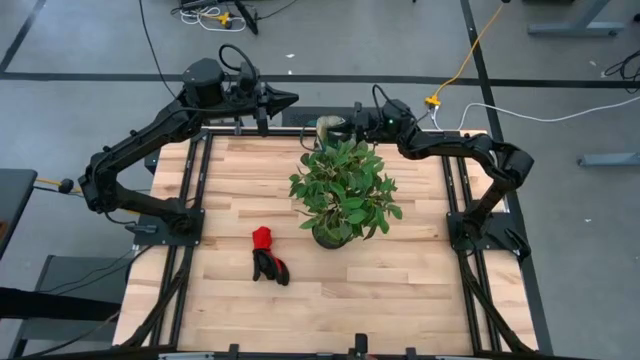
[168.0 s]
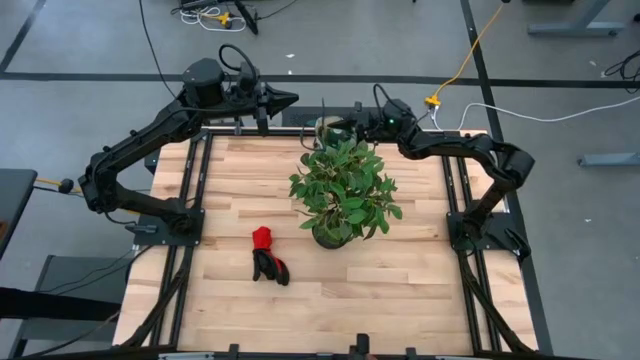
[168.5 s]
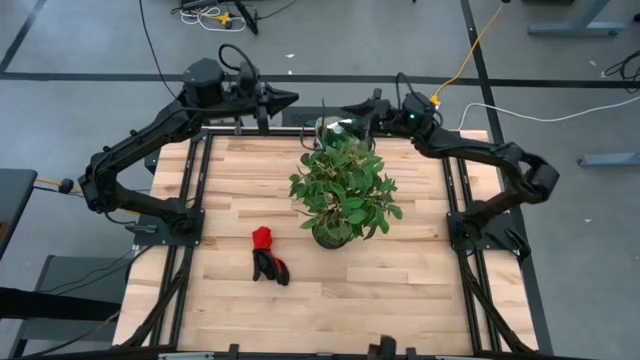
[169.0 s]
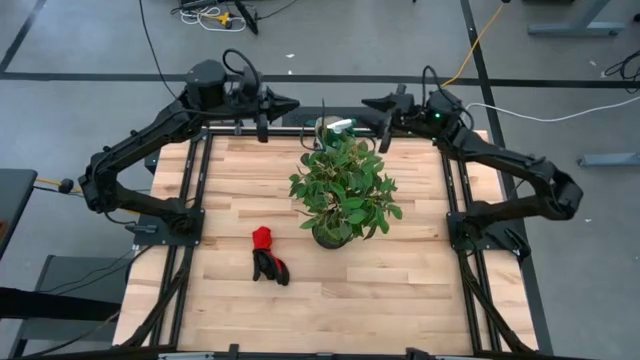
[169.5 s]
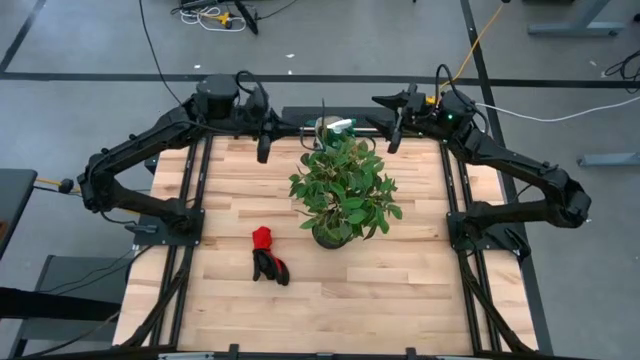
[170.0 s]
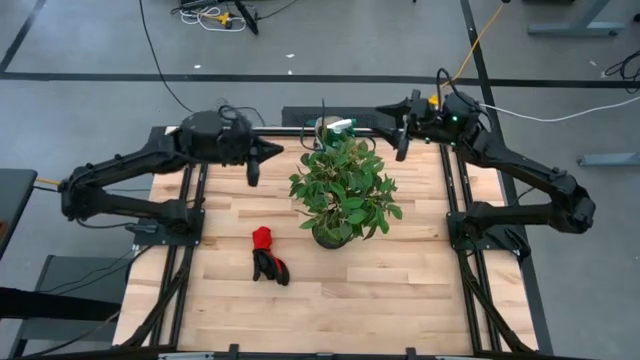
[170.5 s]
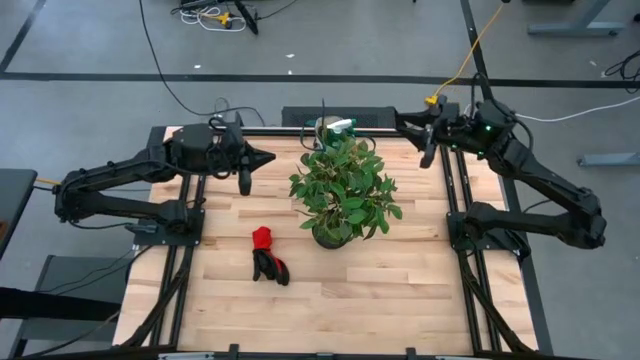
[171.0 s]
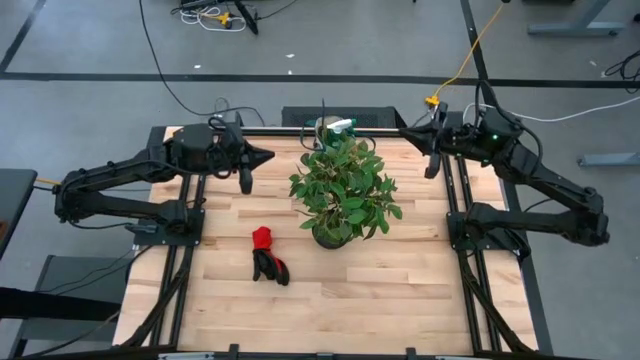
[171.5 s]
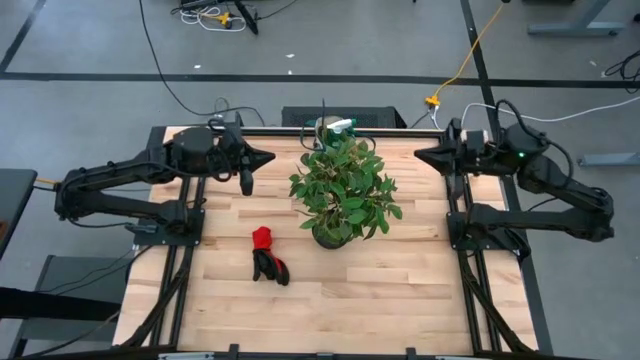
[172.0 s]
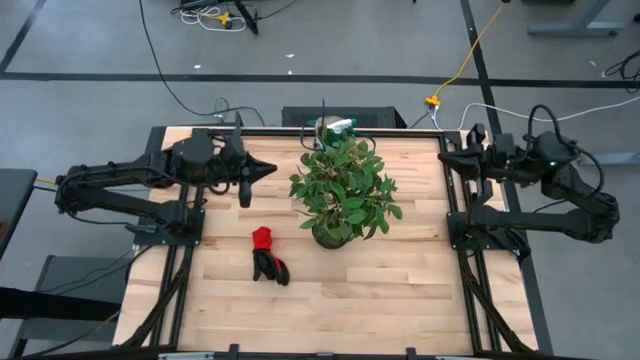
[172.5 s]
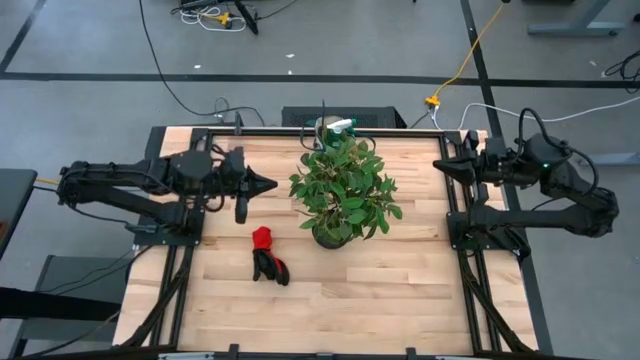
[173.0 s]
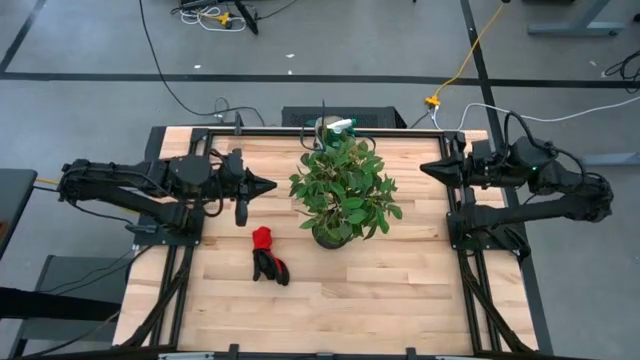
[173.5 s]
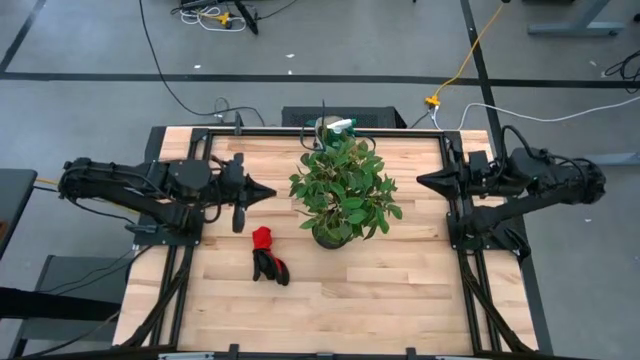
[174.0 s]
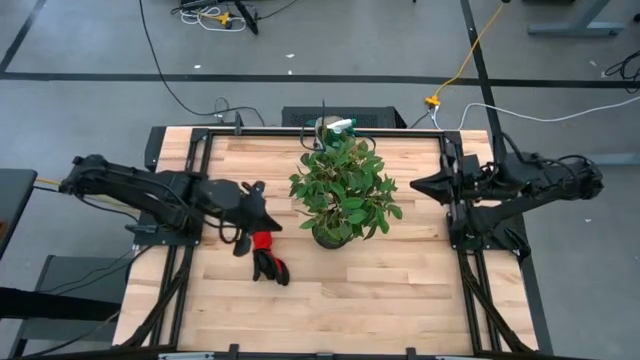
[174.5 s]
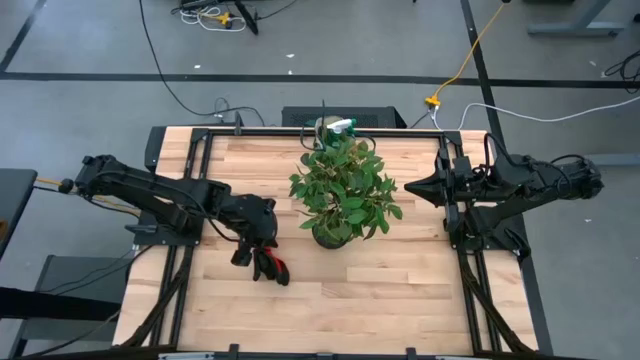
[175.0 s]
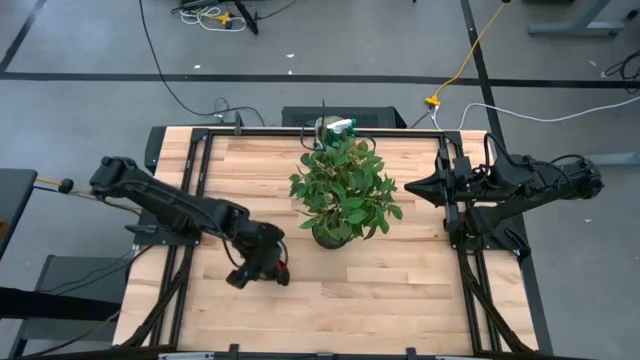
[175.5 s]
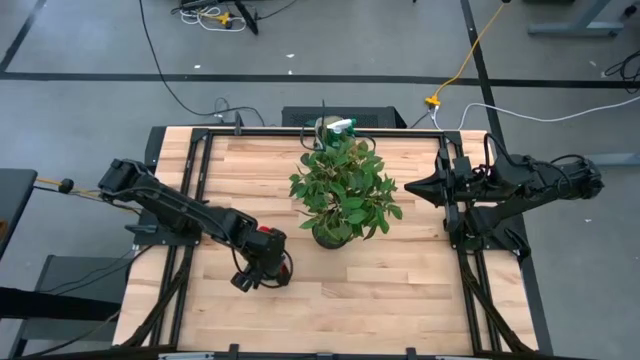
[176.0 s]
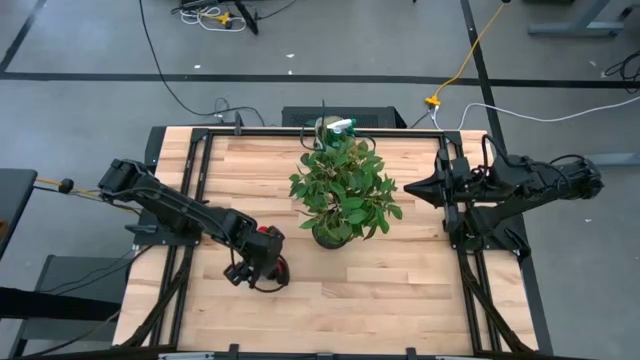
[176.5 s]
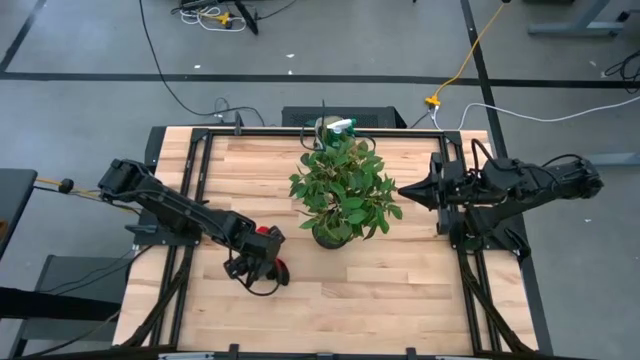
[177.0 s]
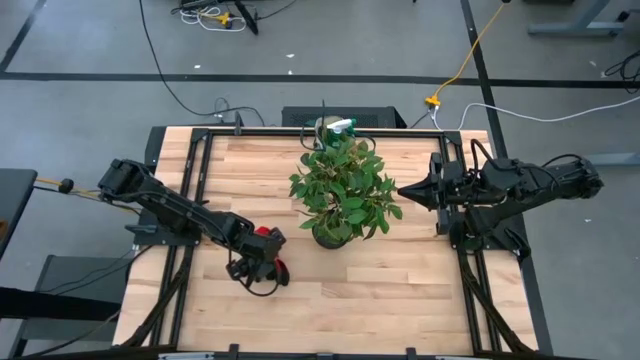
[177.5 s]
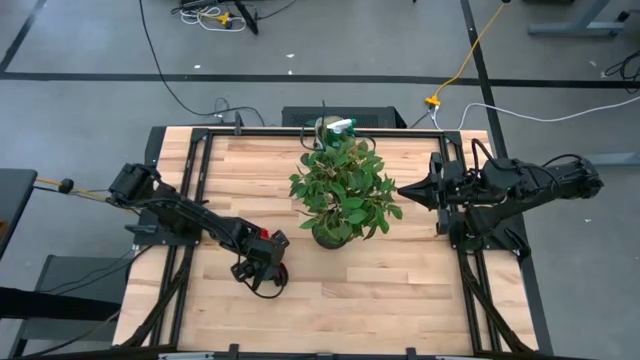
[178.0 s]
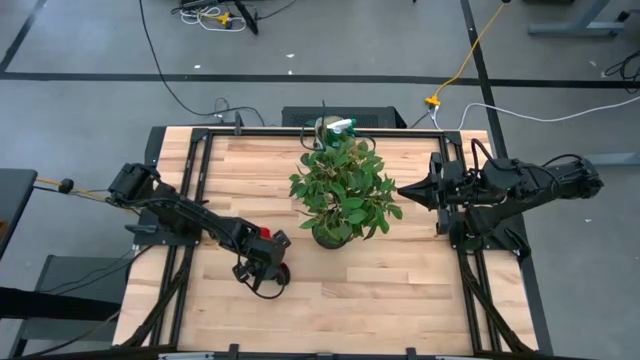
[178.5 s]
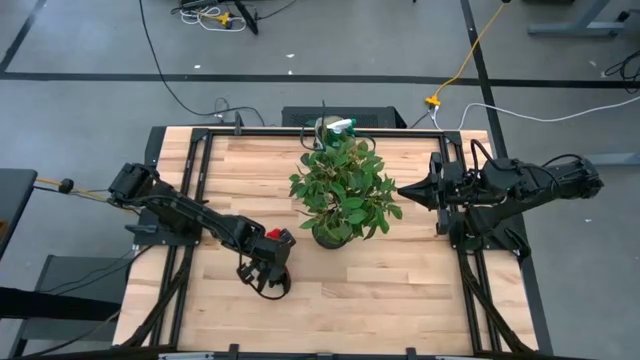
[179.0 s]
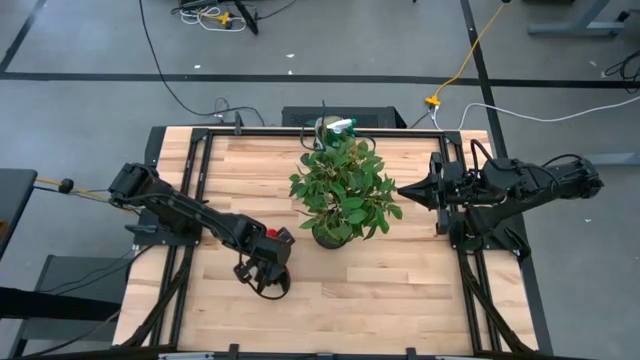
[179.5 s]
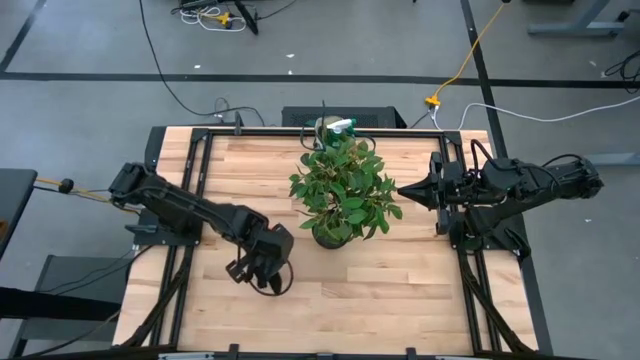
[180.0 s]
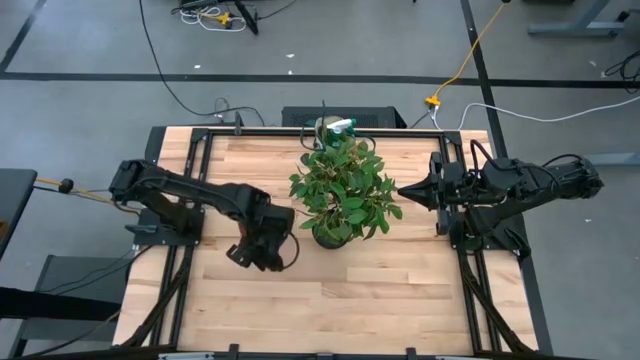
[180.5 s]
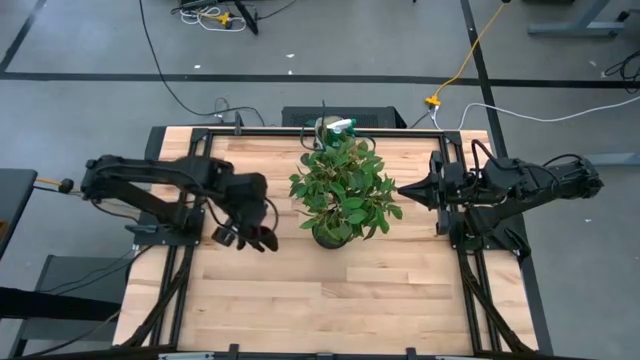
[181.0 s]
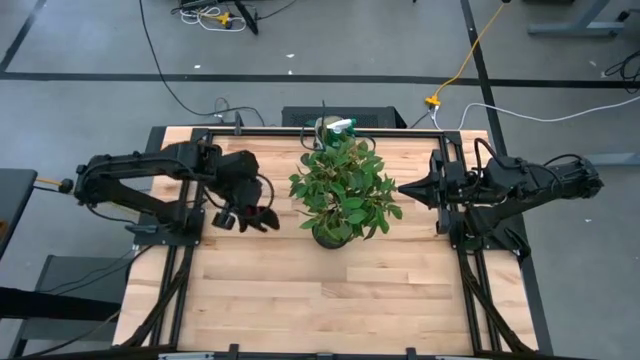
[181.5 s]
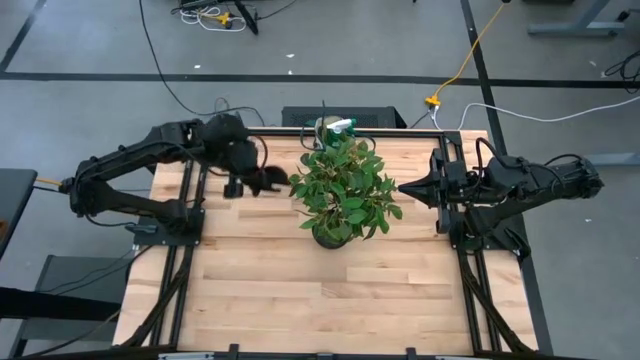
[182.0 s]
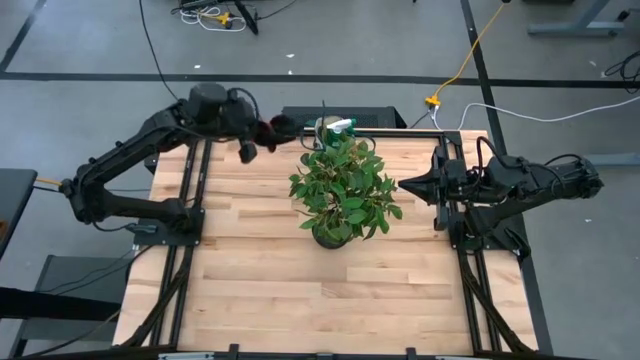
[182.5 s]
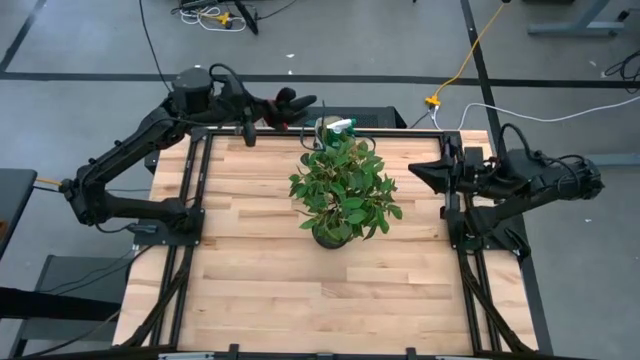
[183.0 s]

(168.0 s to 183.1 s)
Task: Pick & Place Garden tools in Gardening bag
Put the black red gloves into the gardening bag

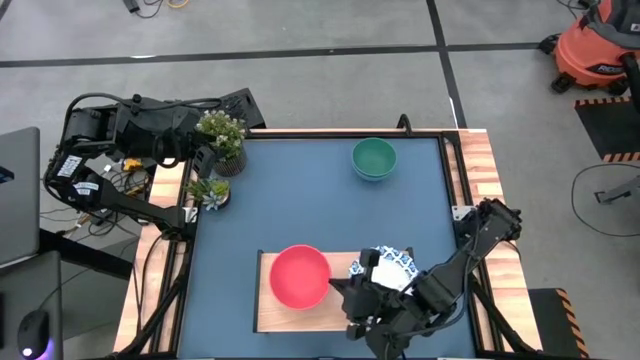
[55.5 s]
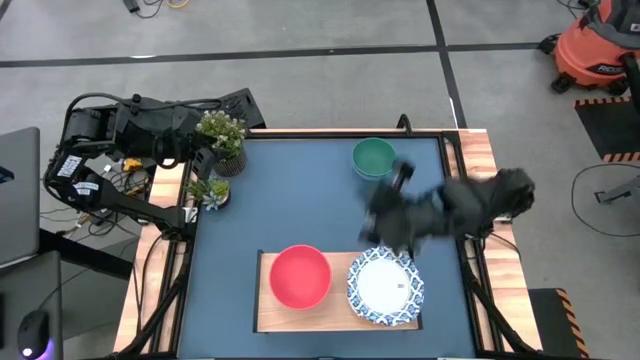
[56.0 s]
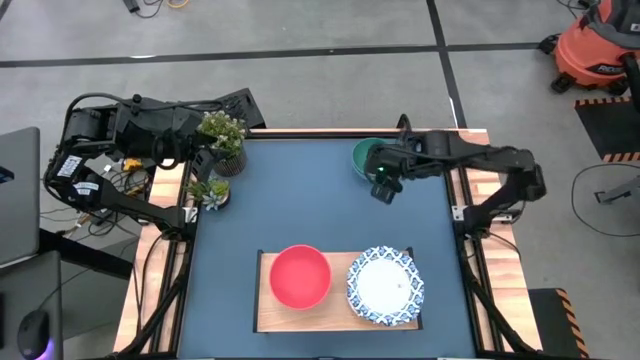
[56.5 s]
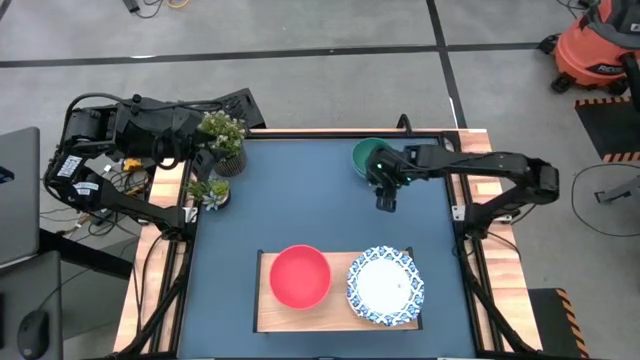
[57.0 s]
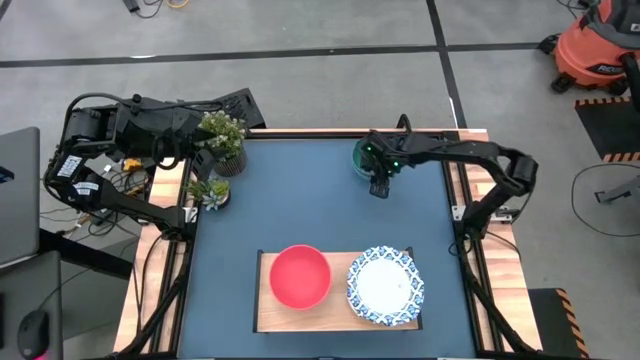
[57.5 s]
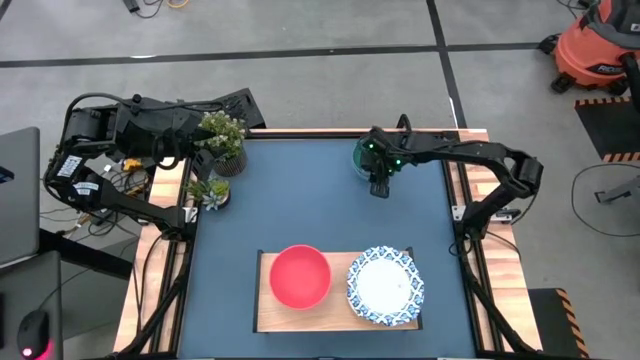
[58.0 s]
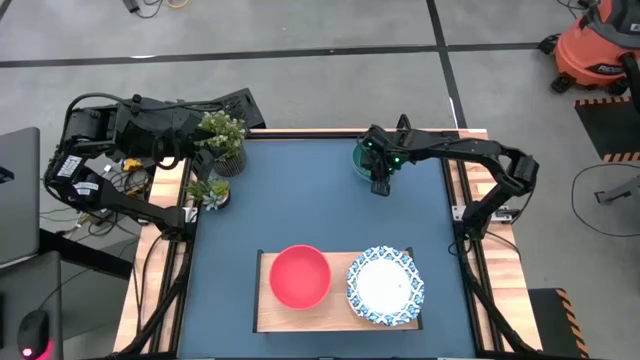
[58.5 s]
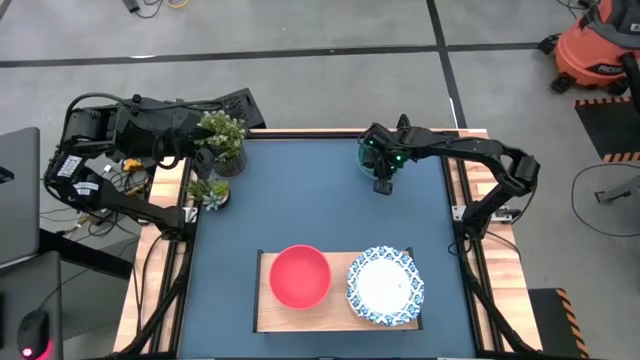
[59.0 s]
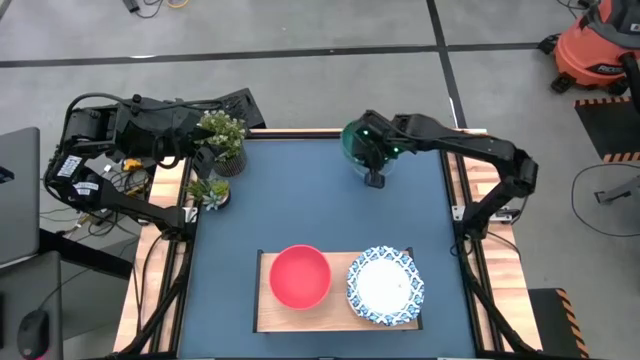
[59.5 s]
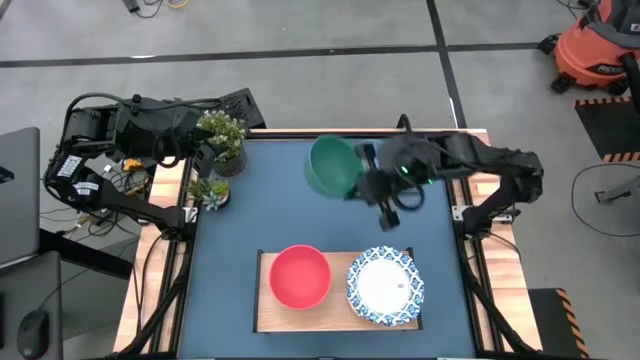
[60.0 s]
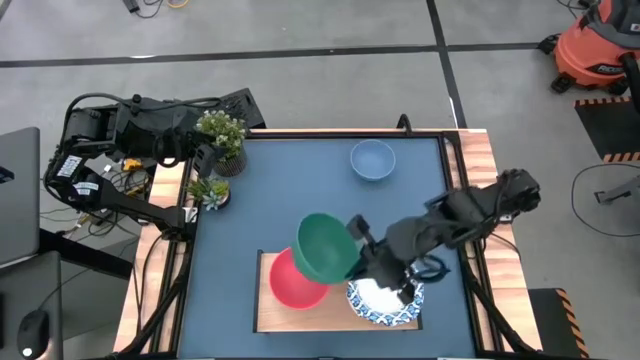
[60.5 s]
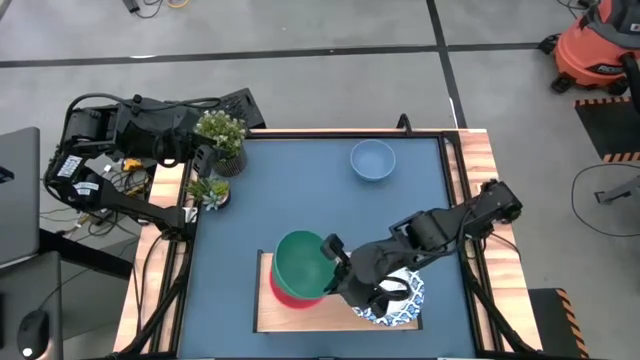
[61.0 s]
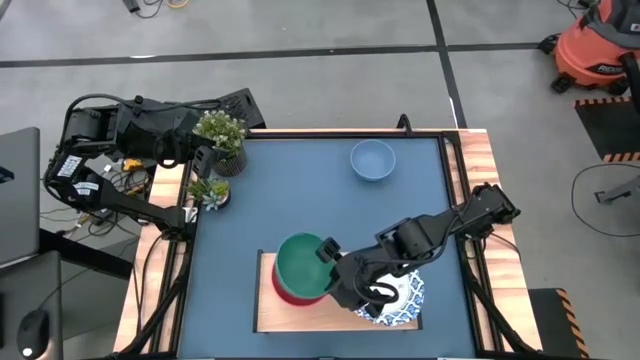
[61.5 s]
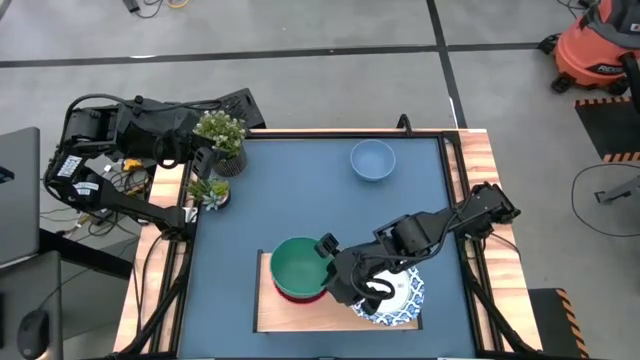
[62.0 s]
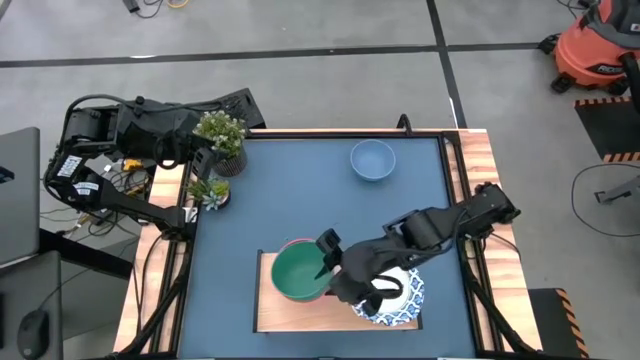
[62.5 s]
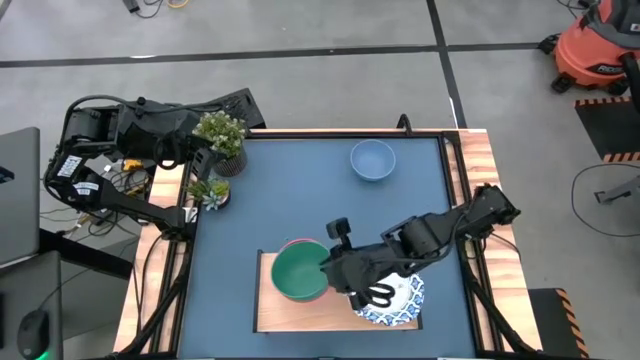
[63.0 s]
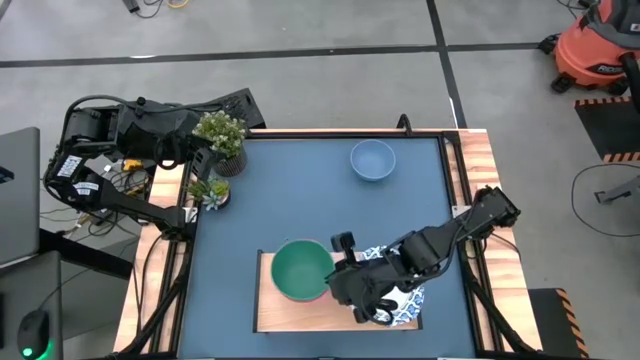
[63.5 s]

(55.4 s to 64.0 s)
Task: Place and stack bowls onto a shelf
Stack the green bowl on top of the orange bowl on the shelf
